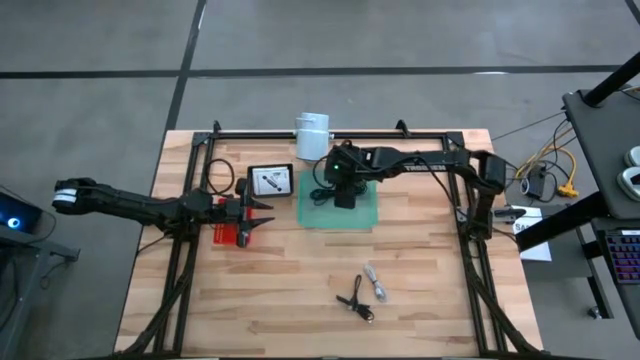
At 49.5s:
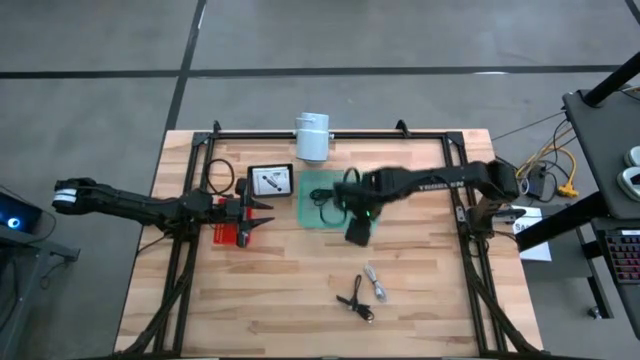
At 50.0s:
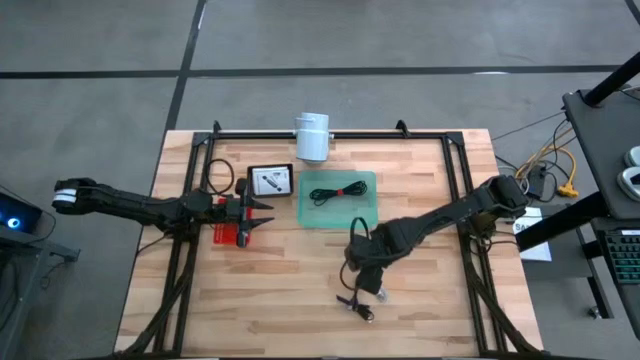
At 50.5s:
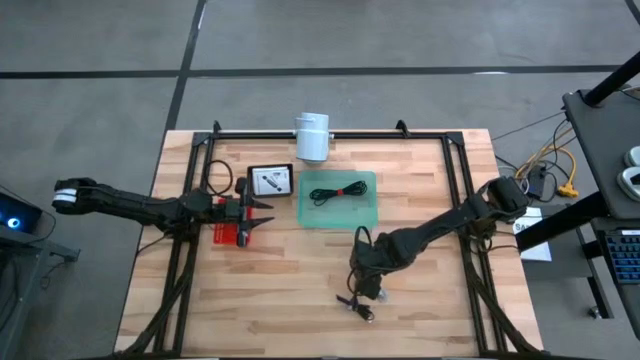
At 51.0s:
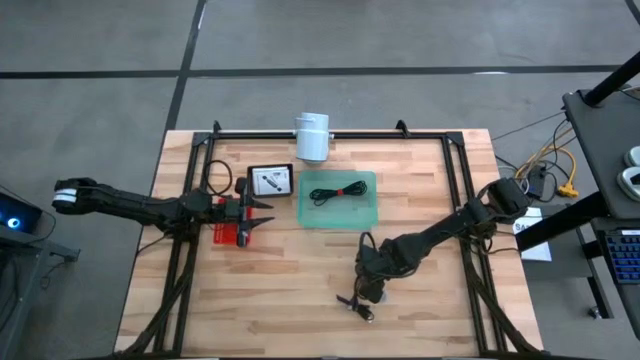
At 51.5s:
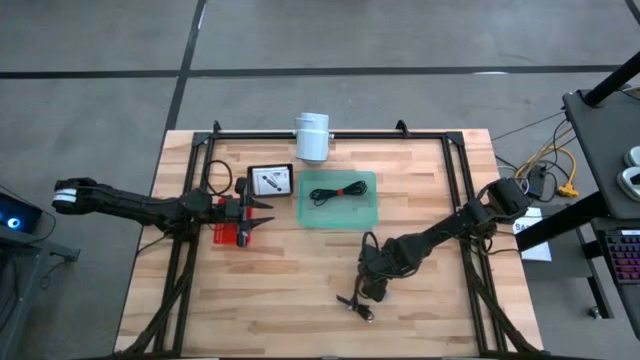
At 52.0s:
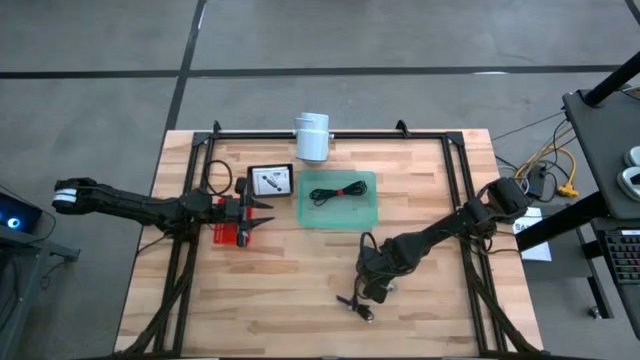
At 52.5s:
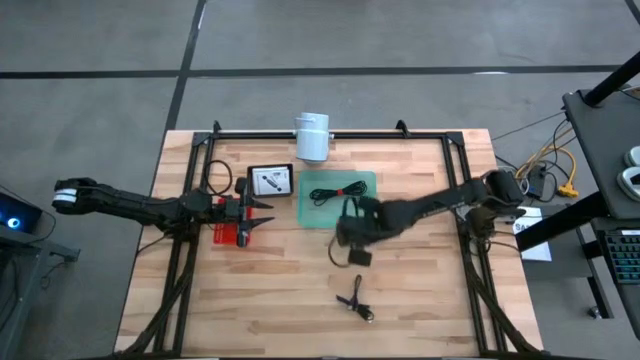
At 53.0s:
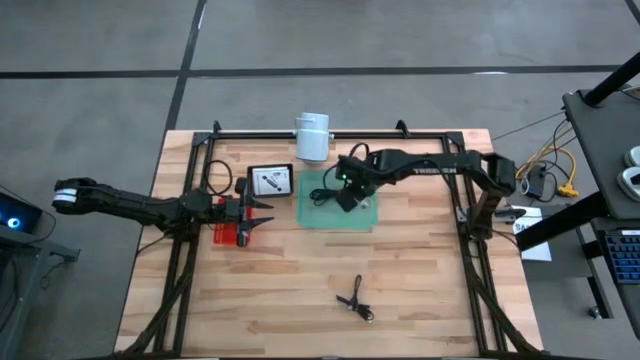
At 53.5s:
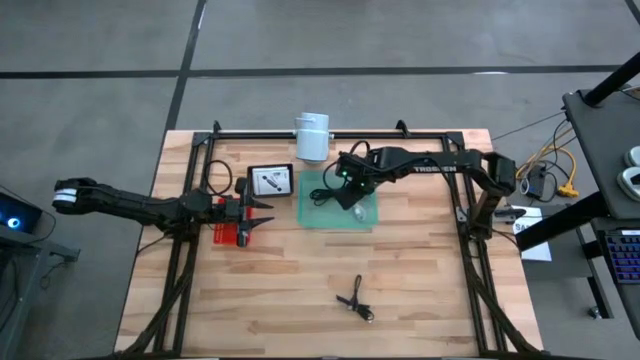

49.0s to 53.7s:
Task: Pick and place items into bin
Put the white charger cable into the green bin

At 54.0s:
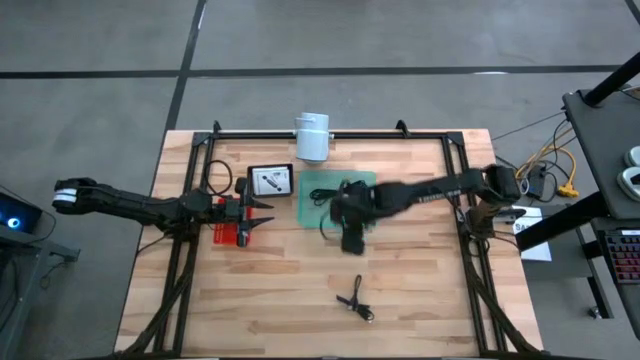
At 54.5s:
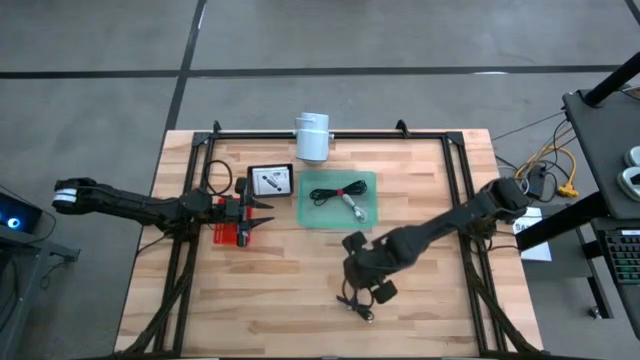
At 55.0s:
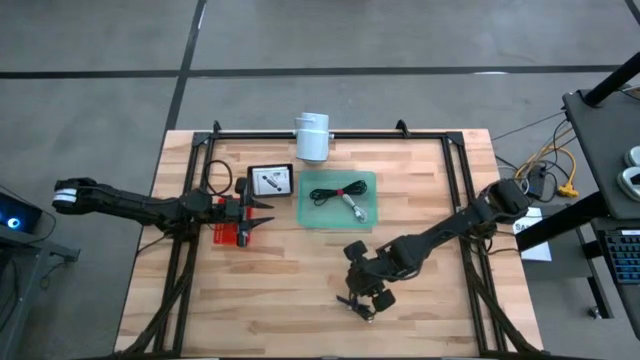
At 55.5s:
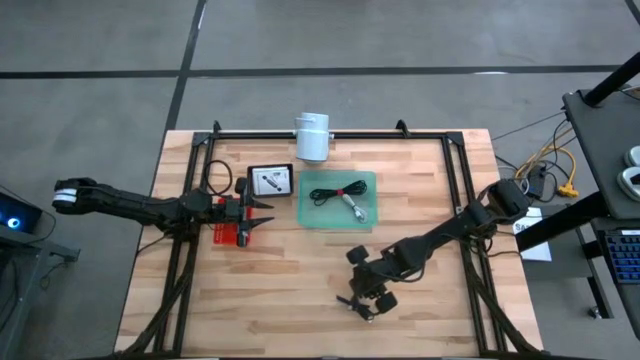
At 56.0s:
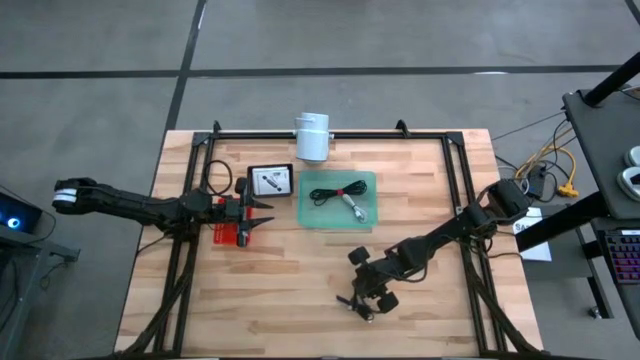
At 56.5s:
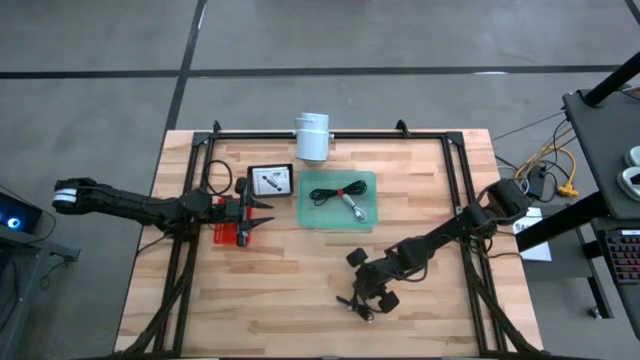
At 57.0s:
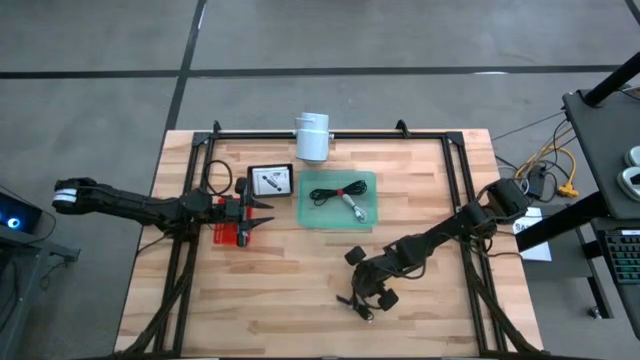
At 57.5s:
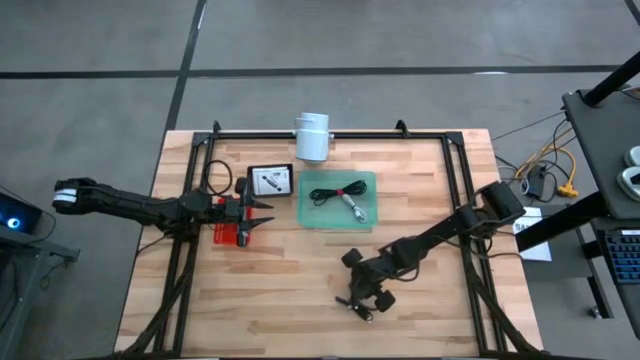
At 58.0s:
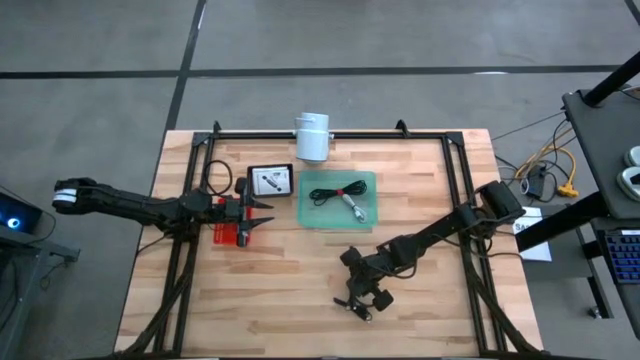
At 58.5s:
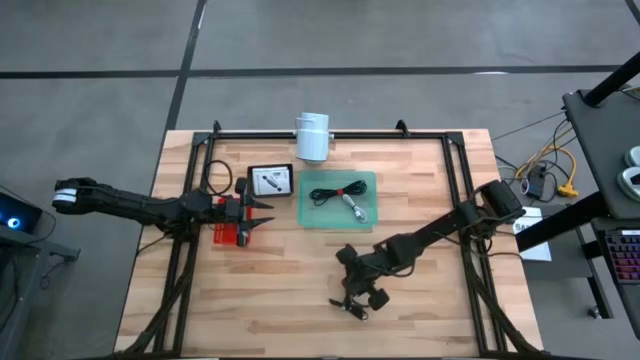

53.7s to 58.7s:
Put the top black charger cable into the green bin

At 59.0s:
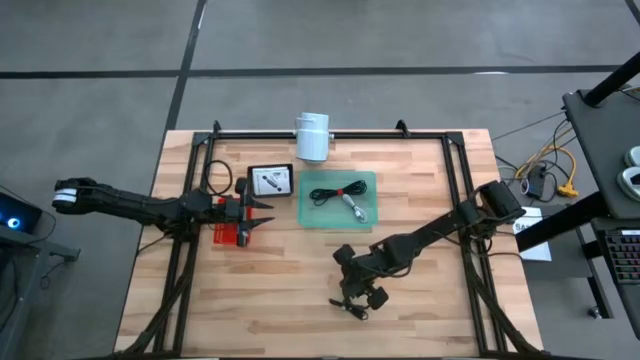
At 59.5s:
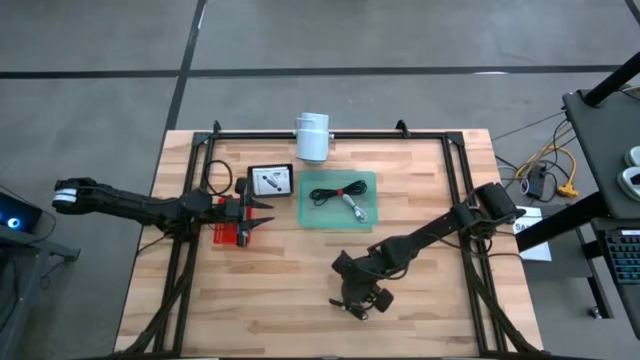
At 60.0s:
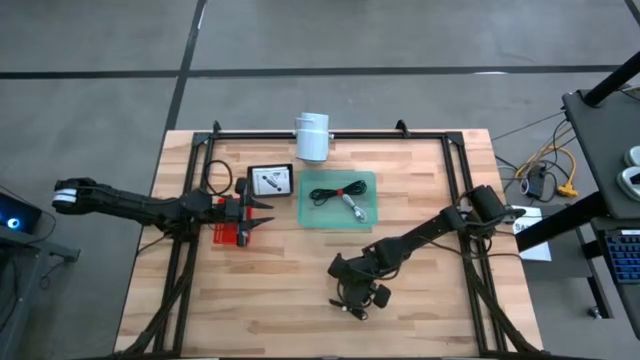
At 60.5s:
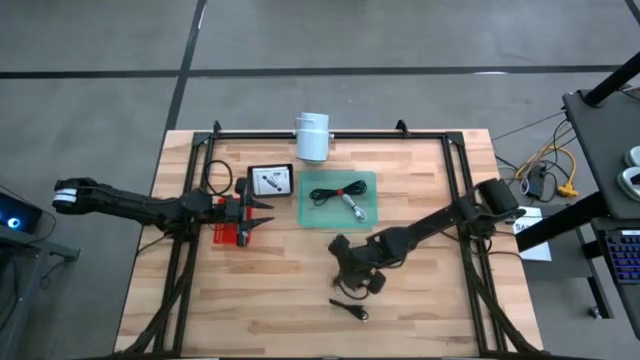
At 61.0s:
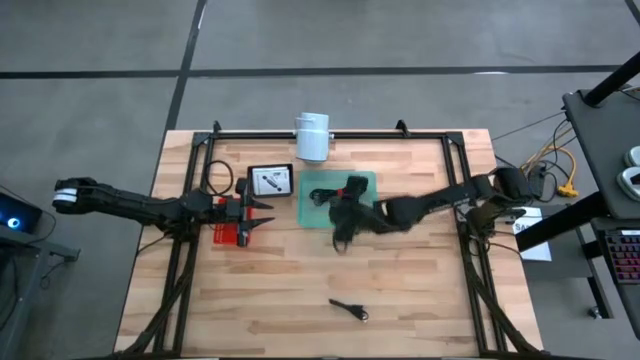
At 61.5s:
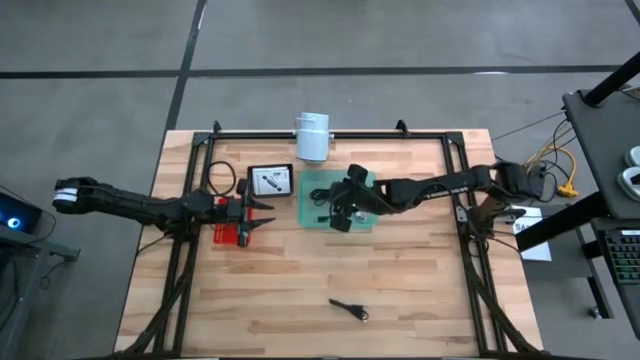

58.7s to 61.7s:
Put the top black charger cable into the green bin

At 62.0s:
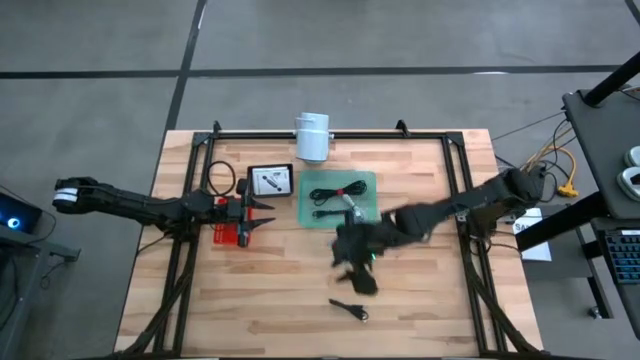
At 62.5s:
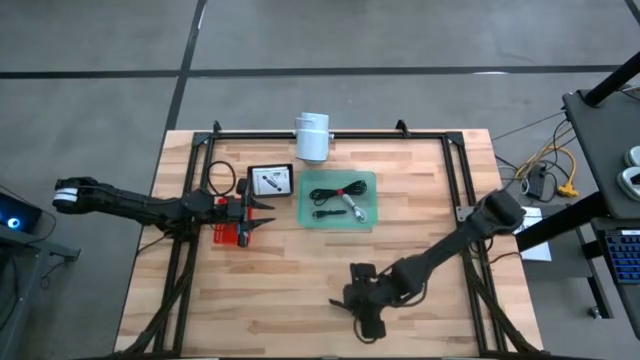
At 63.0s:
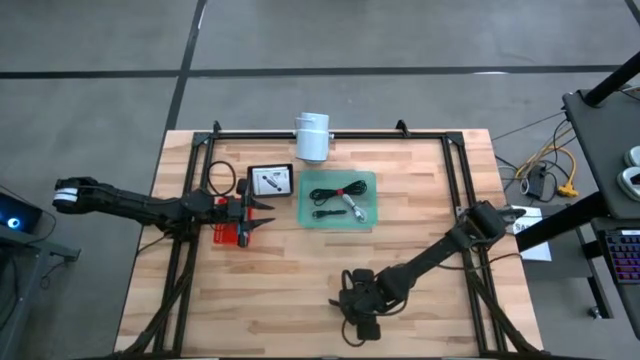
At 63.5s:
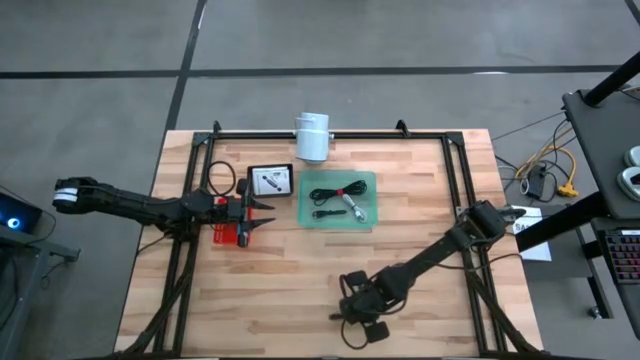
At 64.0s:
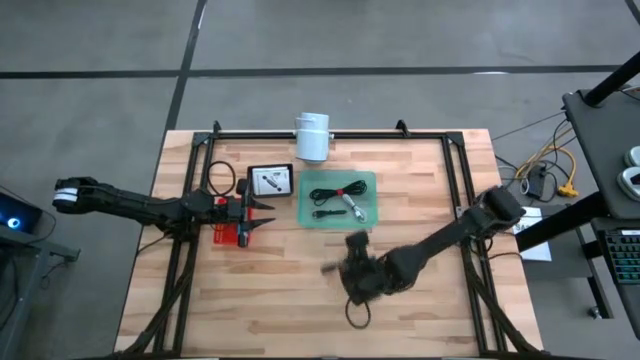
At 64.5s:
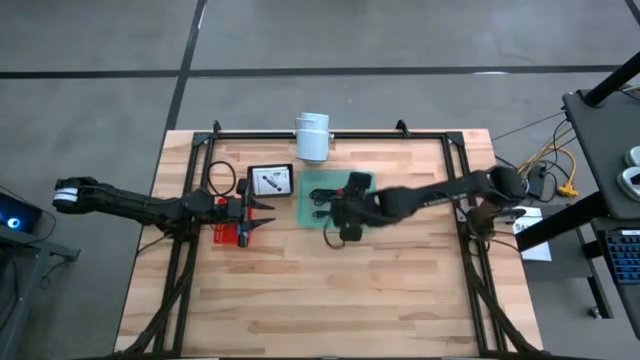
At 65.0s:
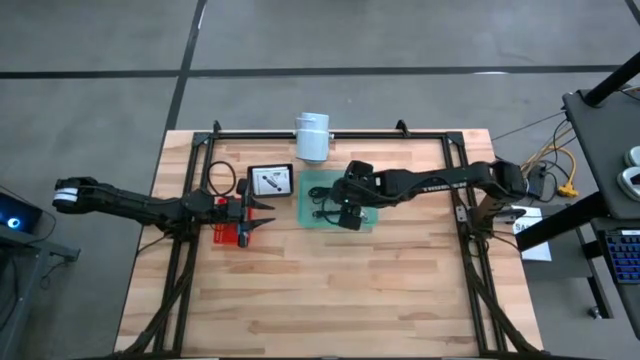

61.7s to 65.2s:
Put the black charger cable into the green bin

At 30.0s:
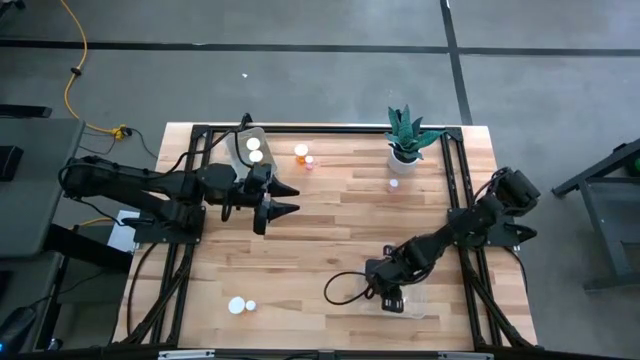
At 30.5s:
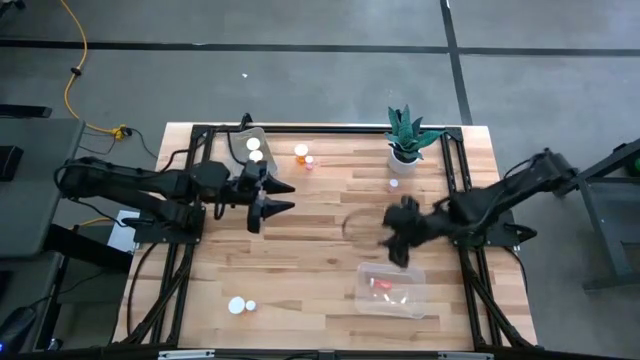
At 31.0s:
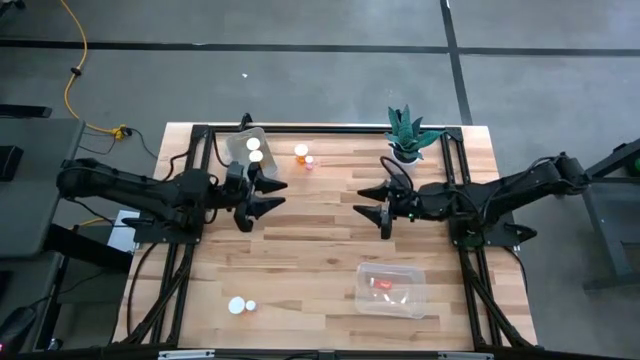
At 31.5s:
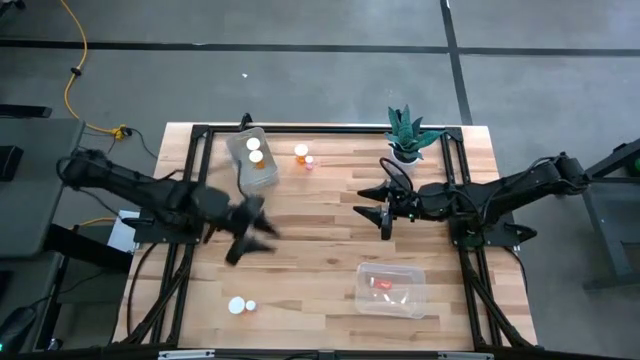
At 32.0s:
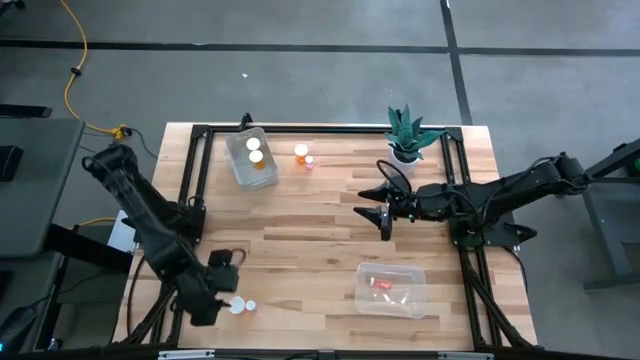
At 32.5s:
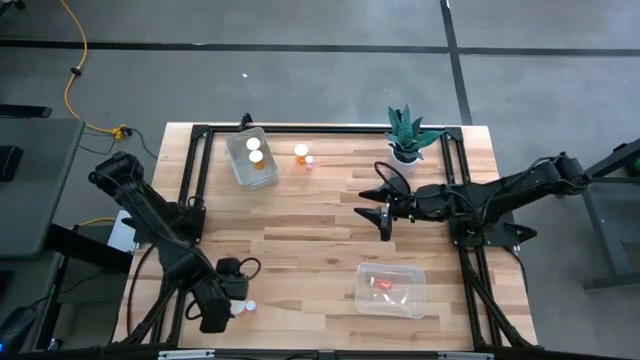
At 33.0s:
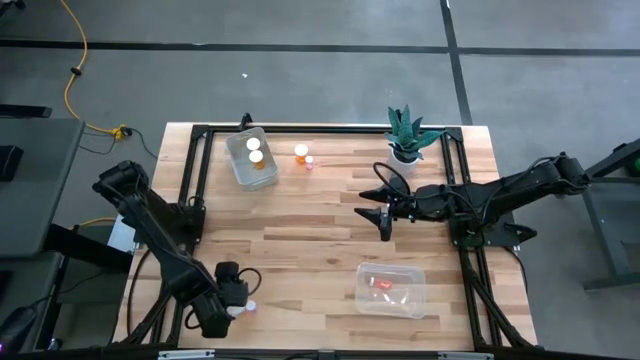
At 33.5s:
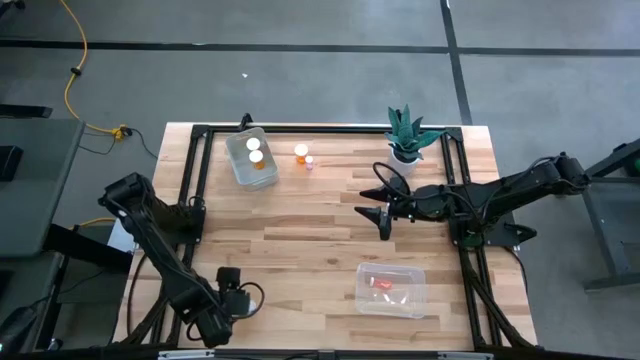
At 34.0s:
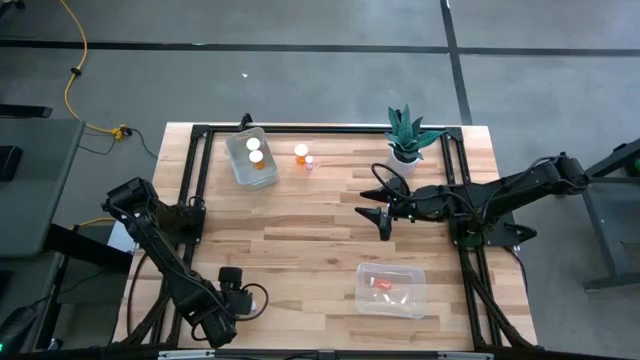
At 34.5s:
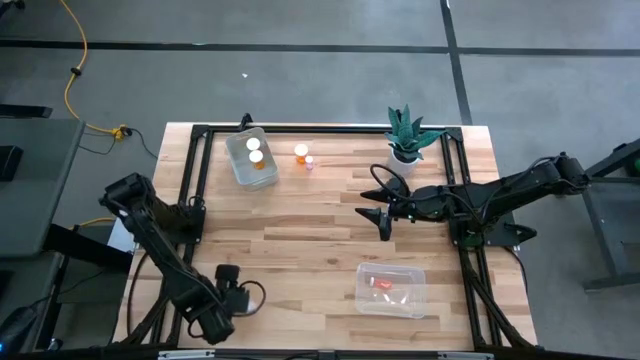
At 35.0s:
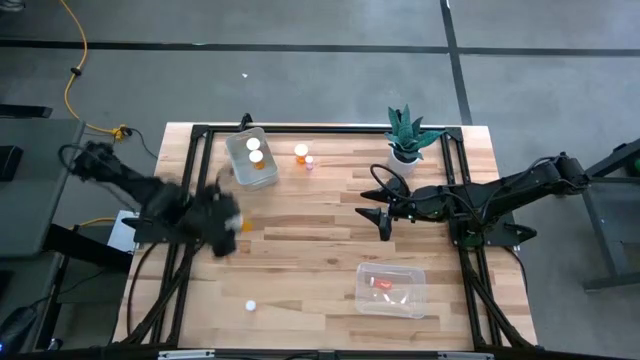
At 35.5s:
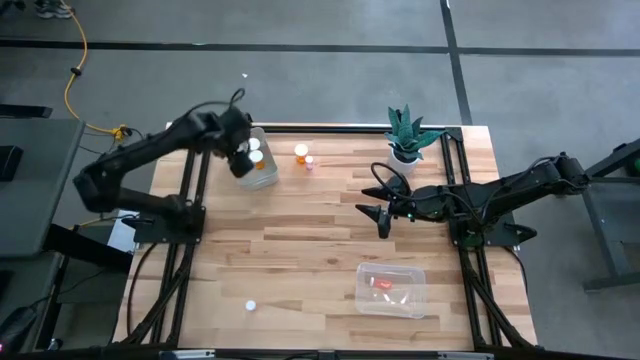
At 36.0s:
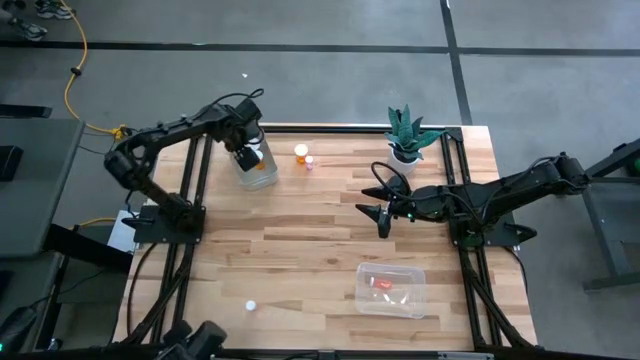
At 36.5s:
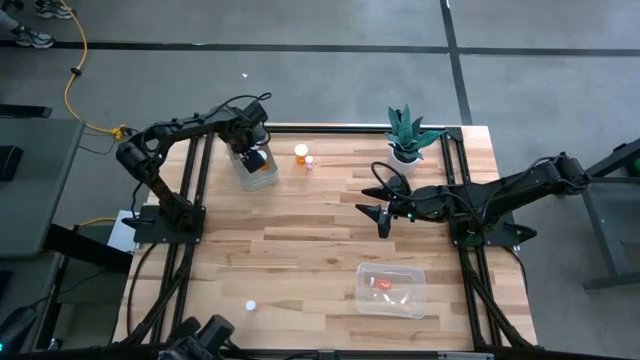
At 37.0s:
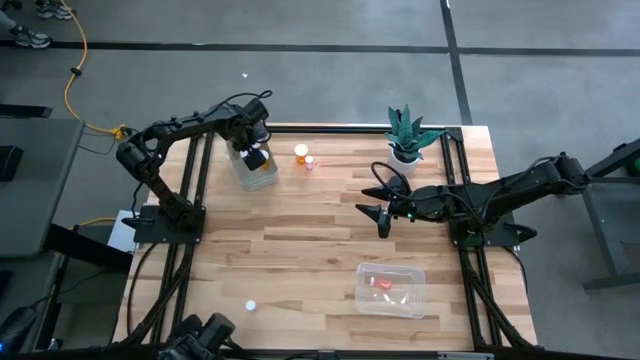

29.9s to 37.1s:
Task: Pick and place medicine bottles into bin by pill shape (circle, oval)
Put the large orange pill bottle into the gray bin
